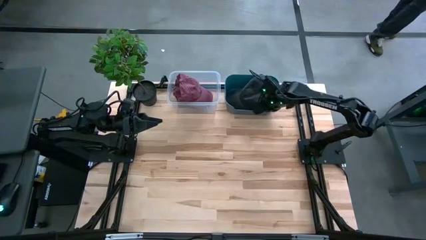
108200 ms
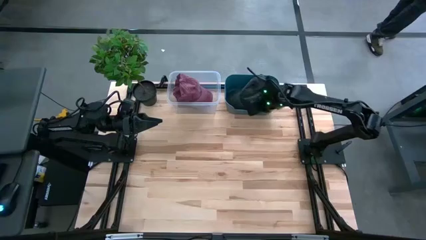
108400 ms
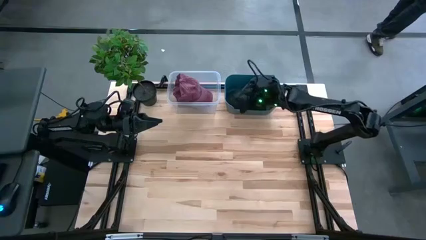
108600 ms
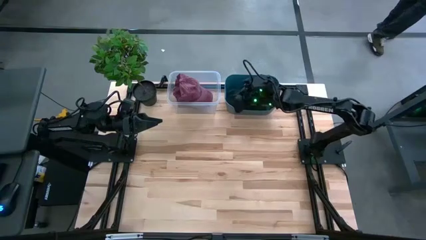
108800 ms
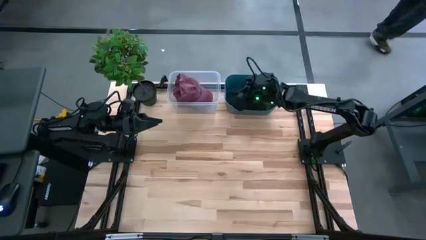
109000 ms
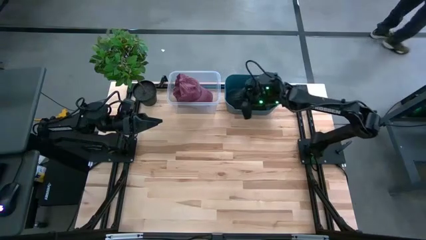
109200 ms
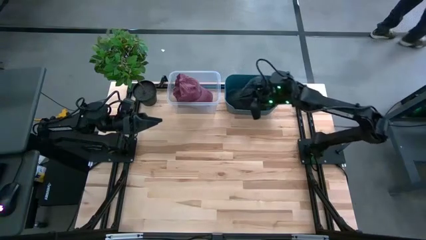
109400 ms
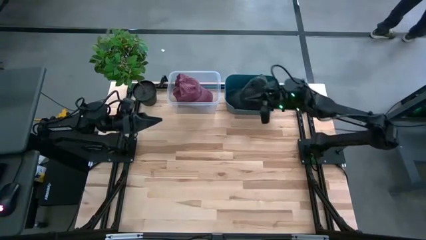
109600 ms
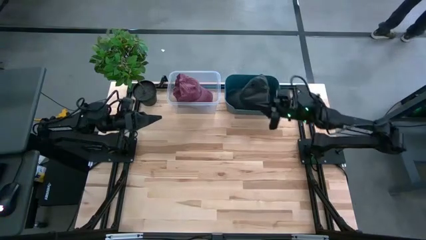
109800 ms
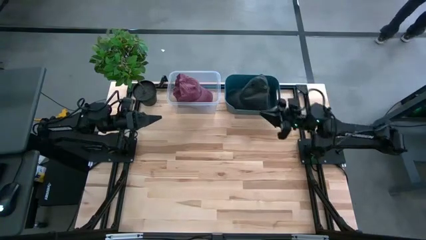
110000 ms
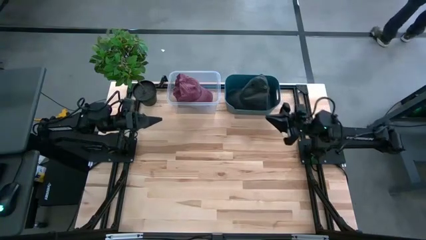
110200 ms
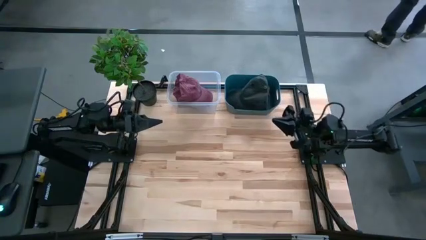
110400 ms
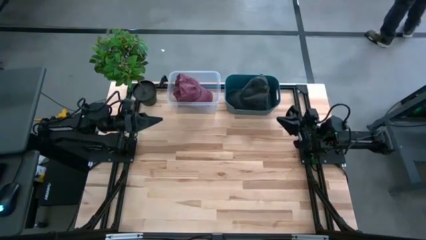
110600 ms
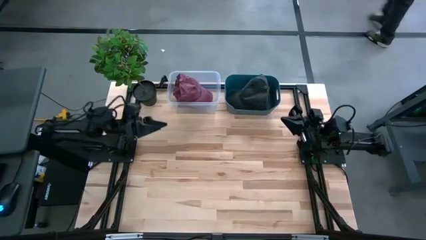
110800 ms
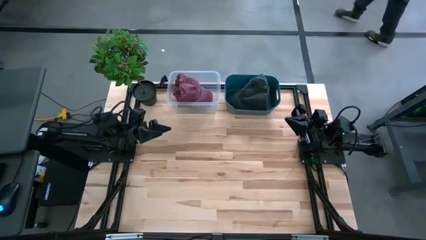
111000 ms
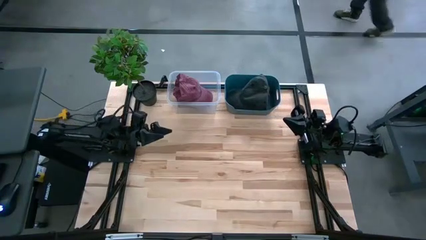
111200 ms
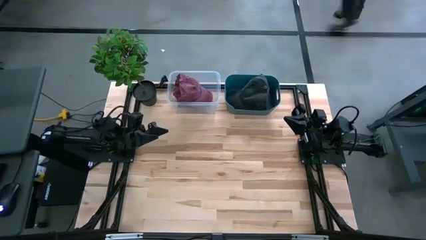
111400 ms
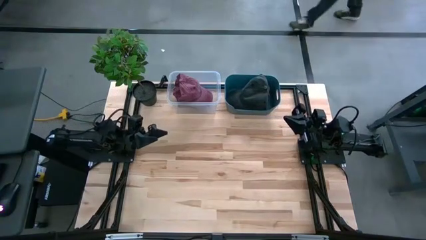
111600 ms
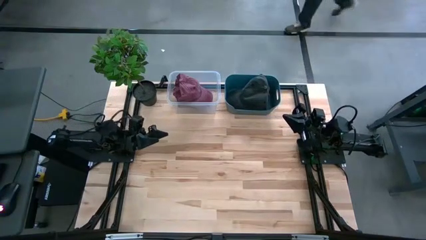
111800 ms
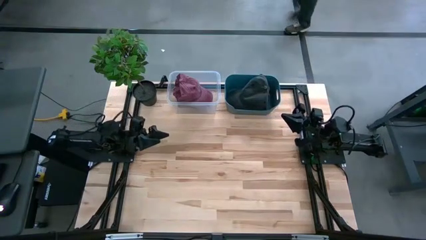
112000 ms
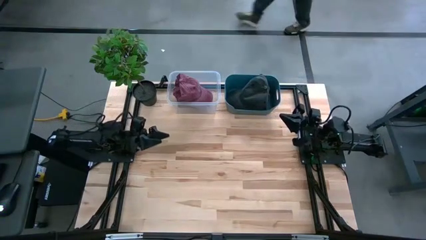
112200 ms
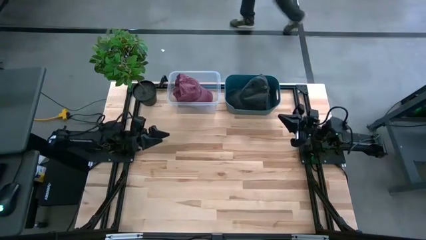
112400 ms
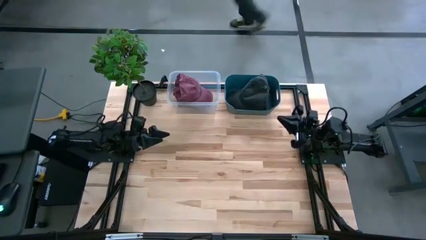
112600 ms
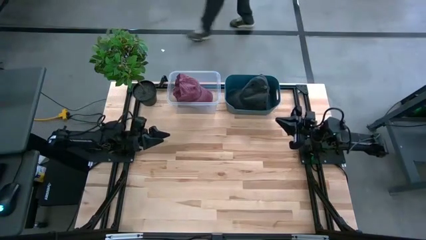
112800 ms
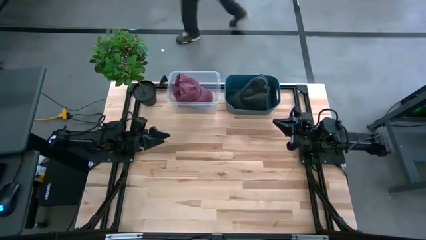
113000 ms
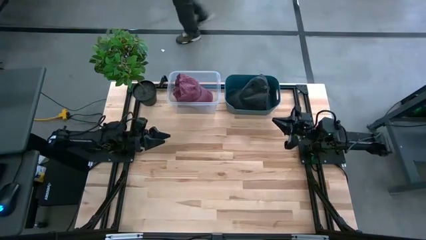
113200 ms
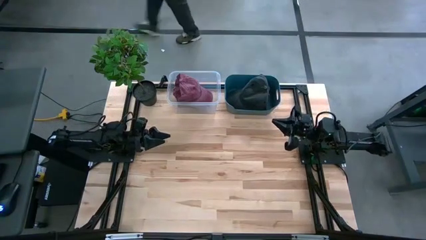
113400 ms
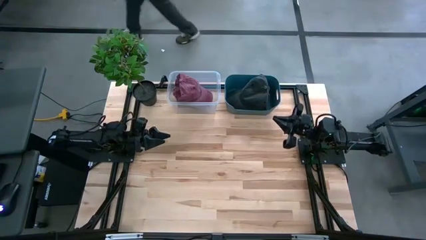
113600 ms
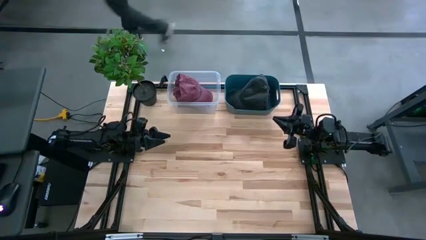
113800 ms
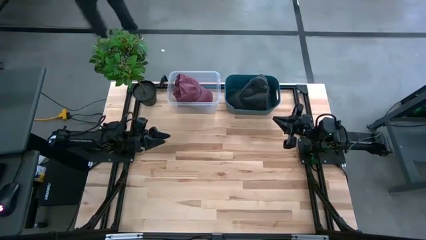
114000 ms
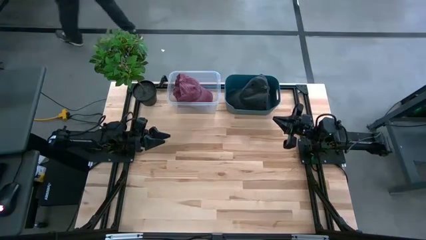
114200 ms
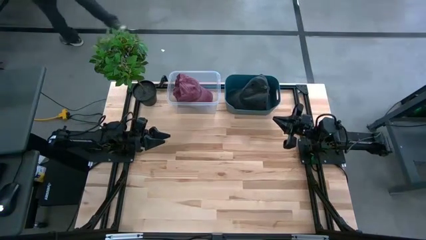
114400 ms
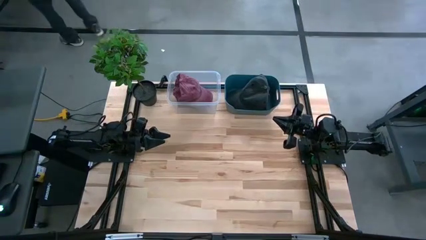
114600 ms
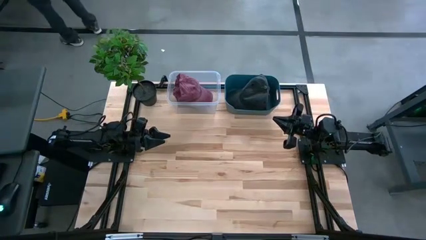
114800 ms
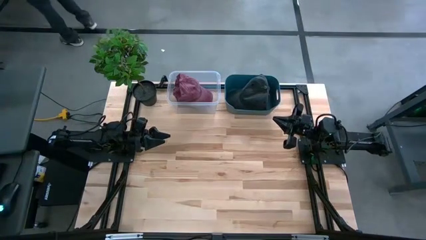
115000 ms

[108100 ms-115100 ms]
Task: Pick & Place hat
Return to Home Position

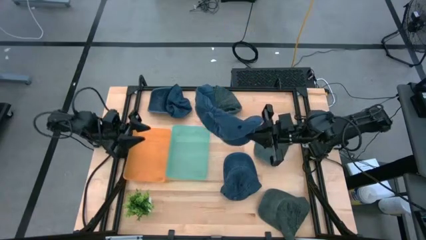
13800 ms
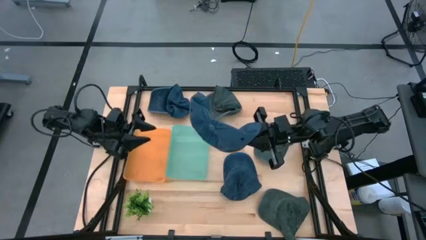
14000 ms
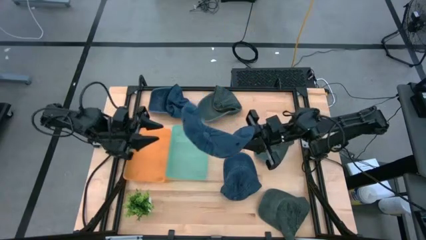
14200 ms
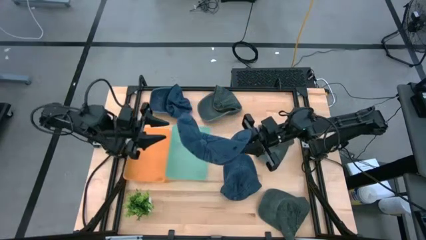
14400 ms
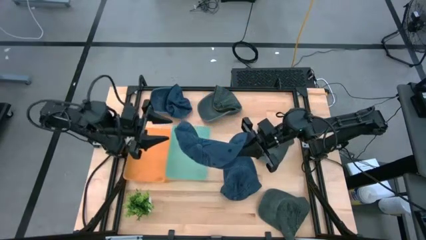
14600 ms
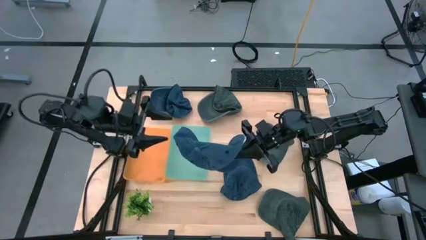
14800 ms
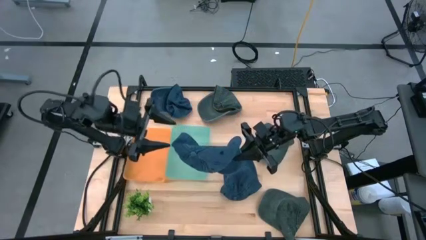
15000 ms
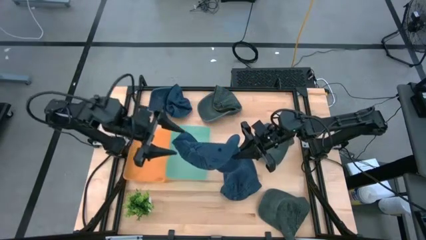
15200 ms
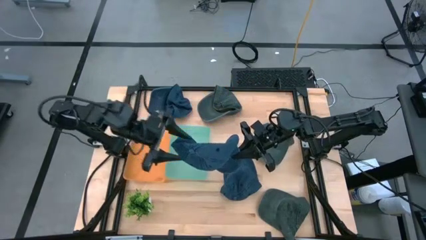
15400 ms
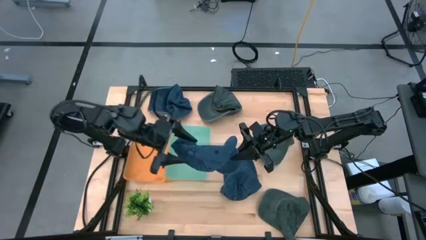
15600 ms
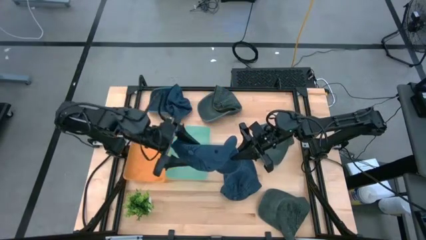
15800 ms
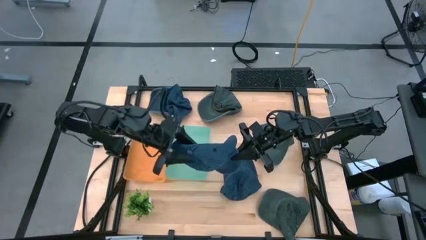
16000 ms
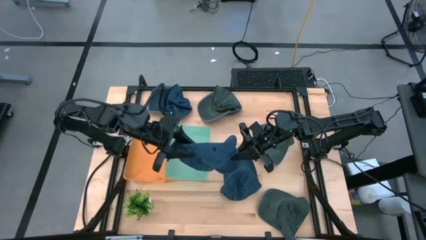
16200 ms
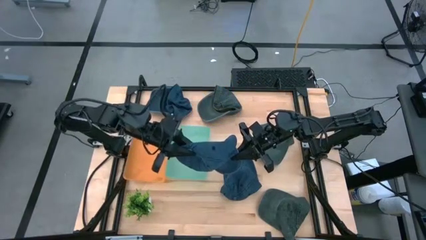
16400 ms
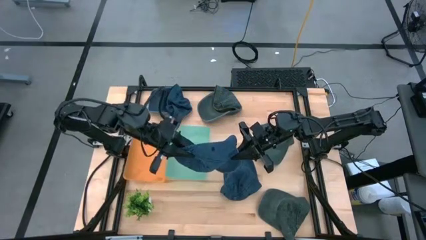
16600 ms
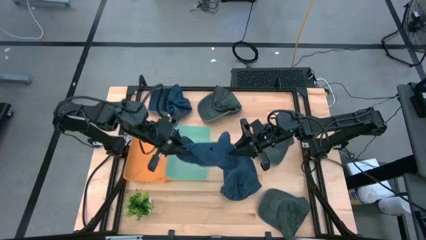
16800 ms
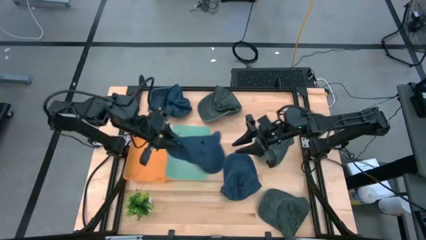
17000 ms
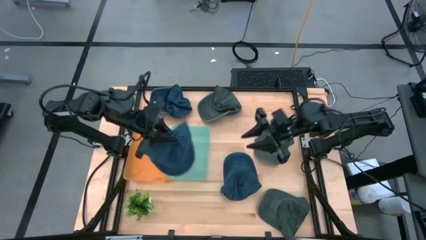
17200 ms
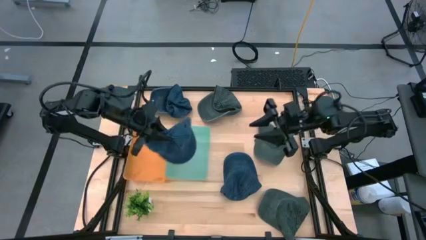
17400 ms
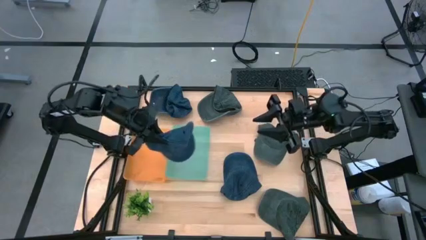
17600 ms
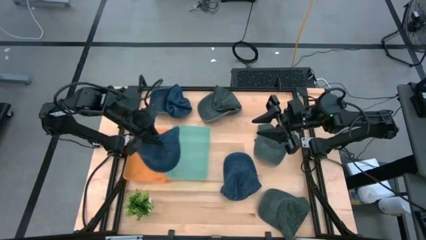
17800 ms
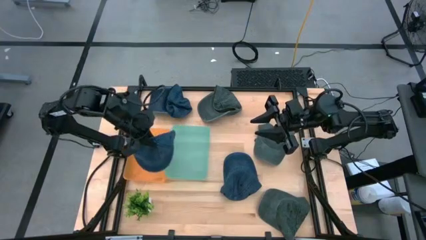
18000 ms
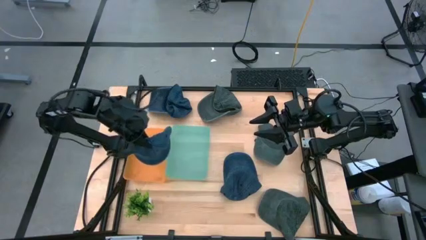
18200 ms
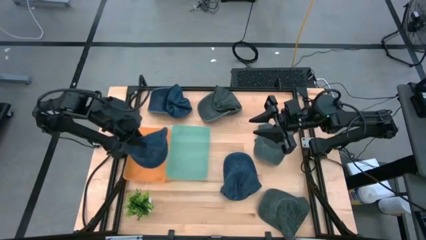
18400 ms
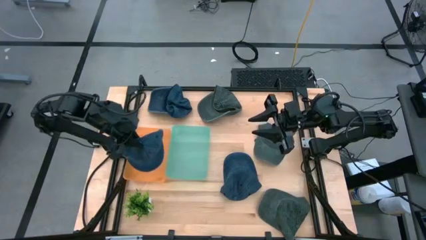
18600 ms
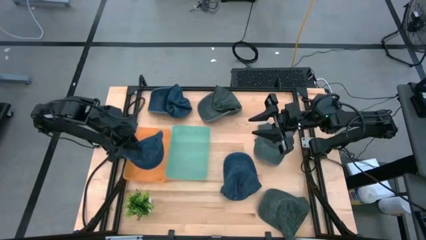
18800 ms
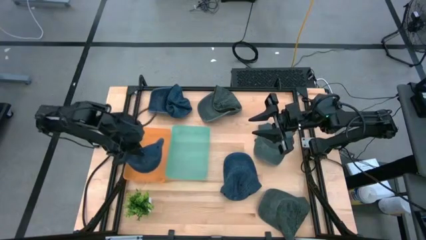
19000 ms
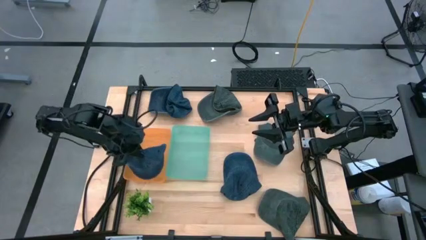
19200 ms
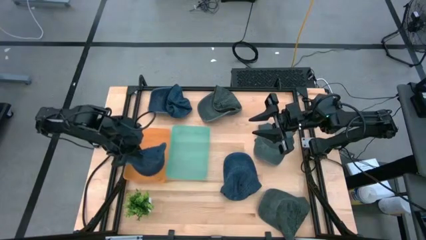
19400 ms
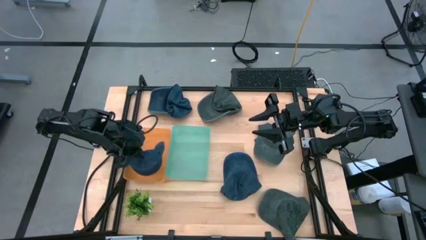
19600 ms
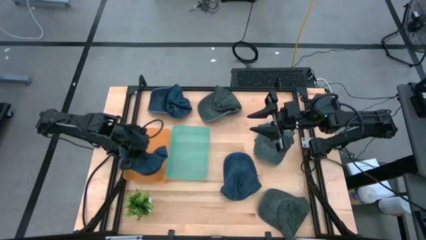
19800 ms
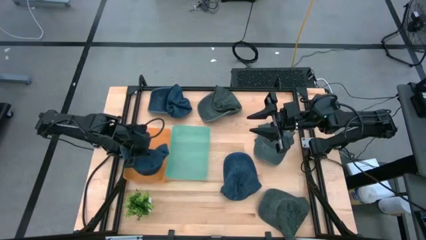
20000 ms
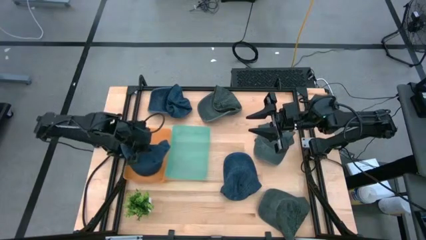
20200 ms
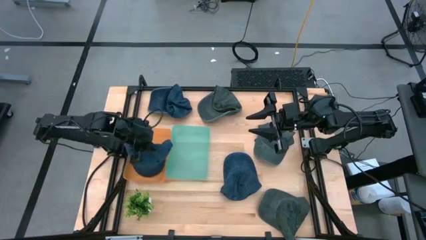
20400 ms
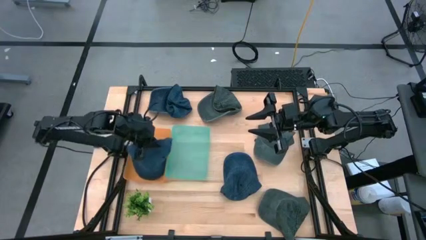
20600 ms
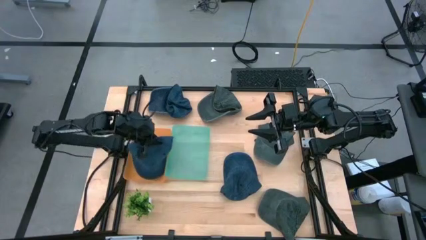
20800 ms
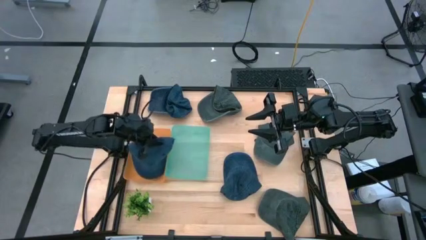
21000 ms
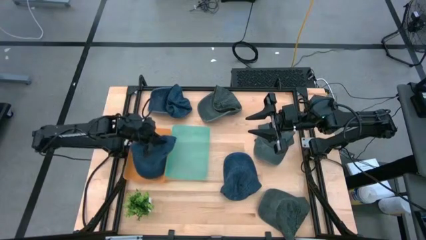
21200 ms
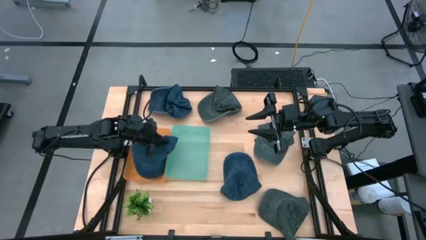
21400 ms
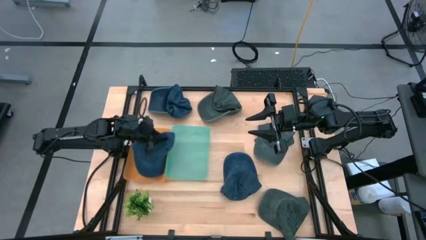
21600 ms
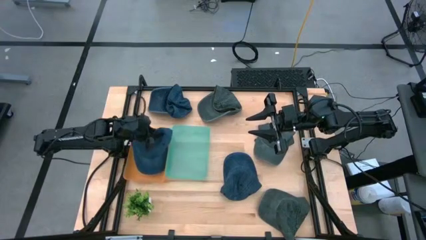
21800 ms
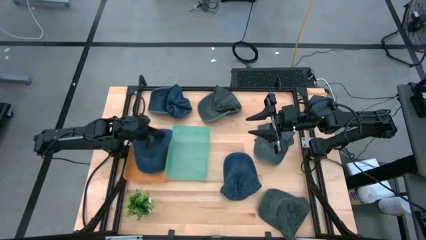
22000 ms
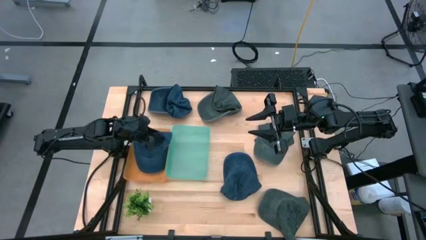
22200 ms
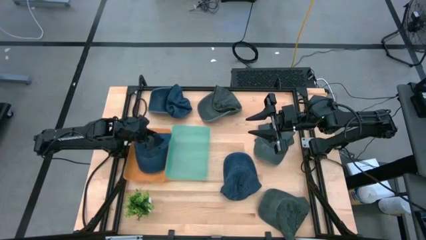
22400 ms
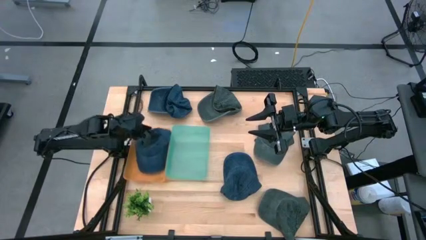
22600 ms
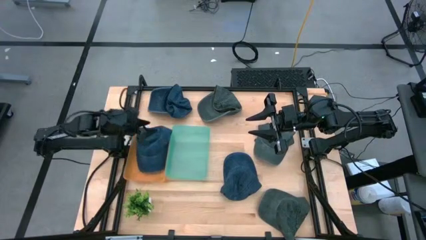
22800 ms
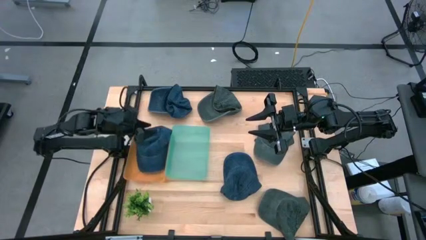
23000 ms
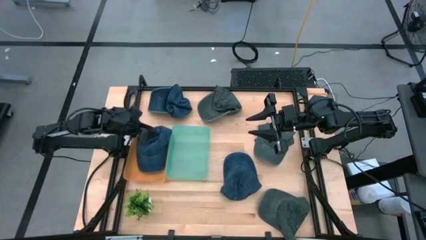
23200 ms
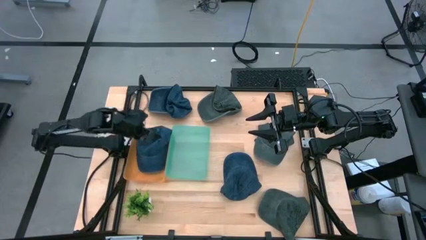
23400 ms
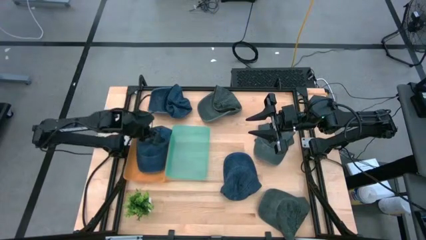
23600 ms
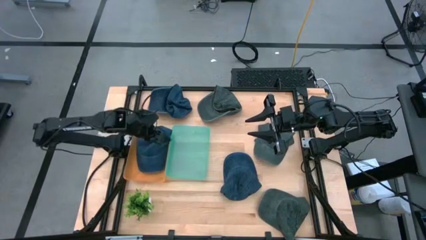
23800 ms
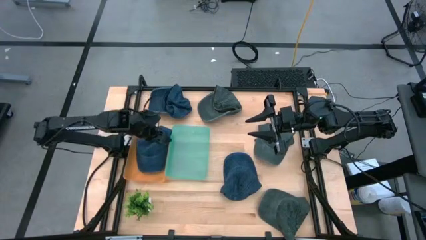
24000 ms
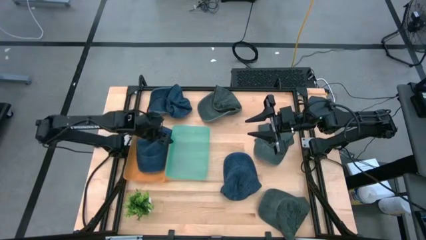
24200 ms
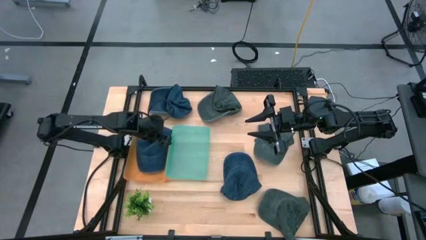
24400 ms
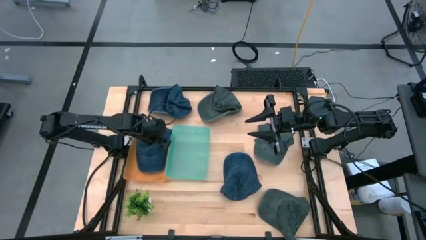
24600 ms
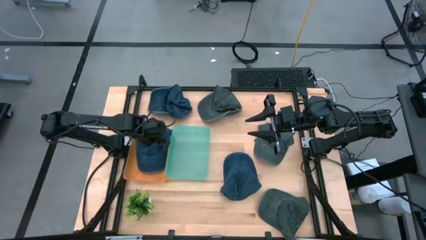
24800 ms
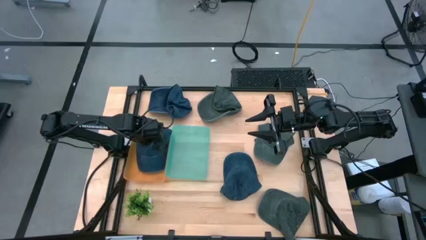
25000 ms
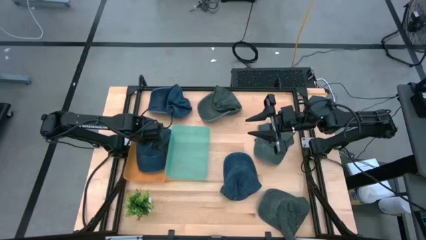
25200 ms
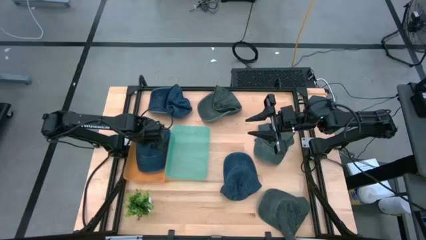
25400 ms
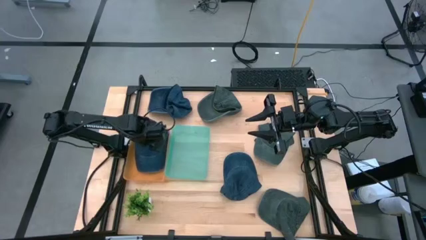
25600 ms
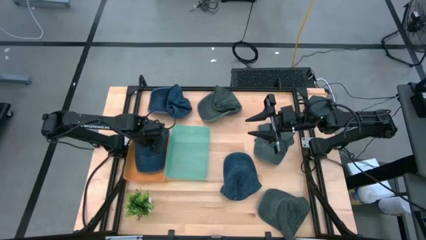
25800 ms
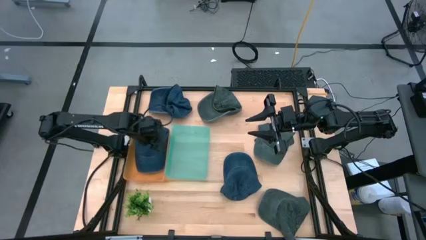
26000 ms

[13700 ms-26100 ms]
Task: Pick & Place hat
Put the top right blue cap into the orange bin
